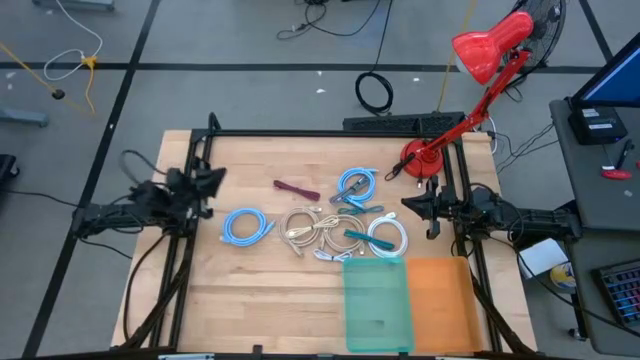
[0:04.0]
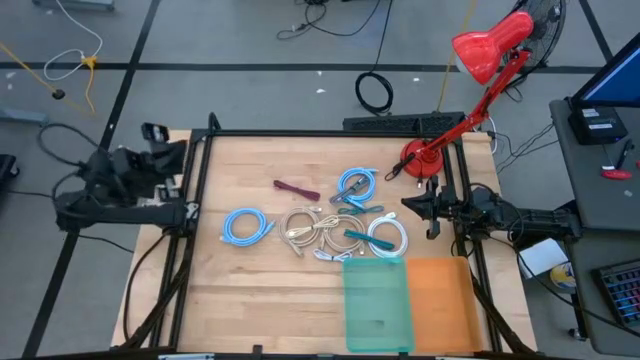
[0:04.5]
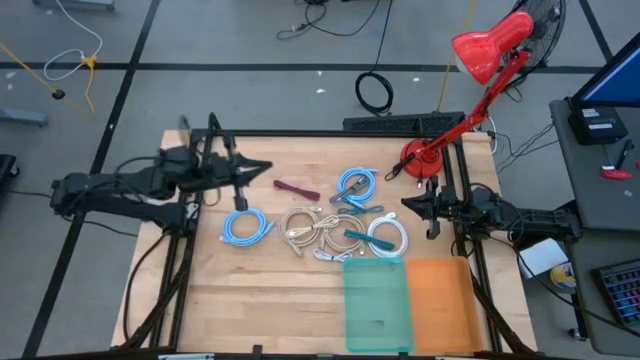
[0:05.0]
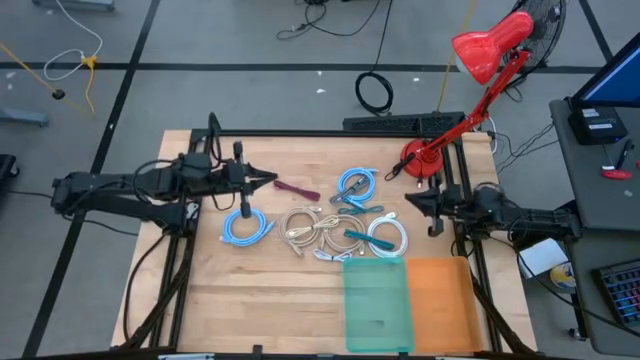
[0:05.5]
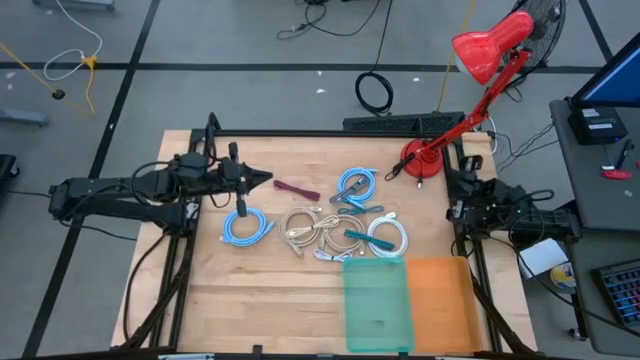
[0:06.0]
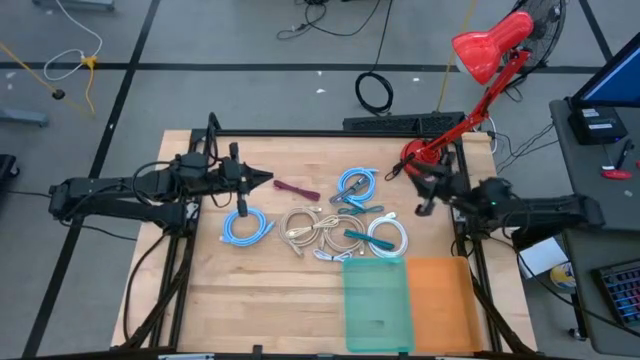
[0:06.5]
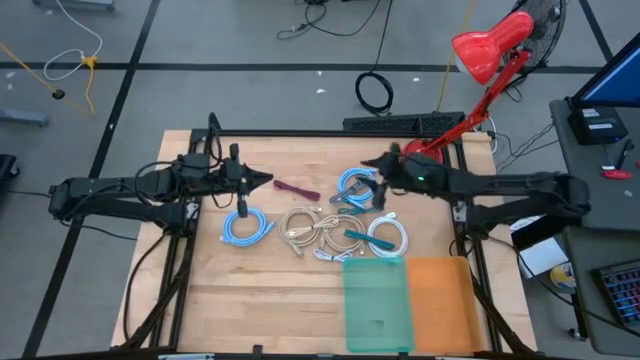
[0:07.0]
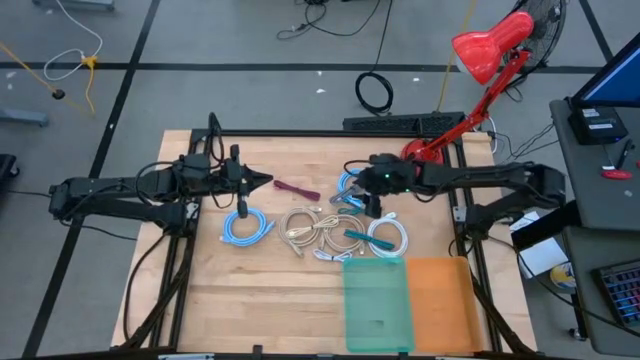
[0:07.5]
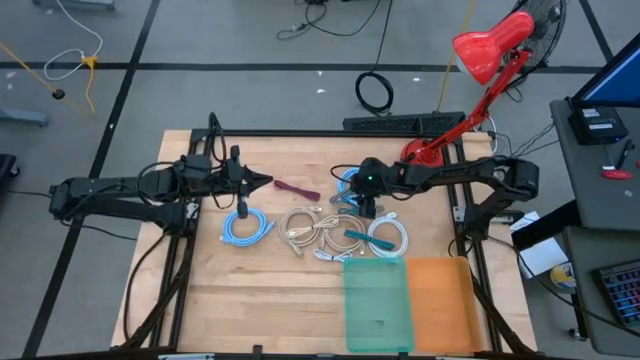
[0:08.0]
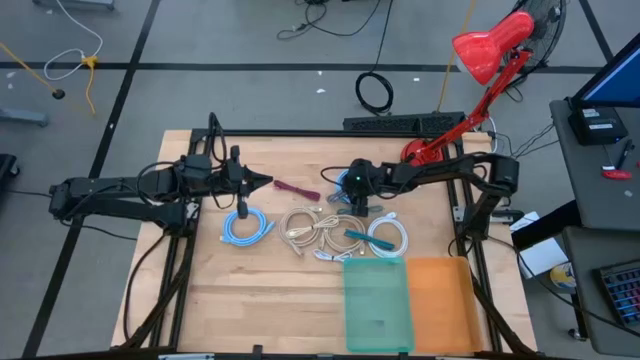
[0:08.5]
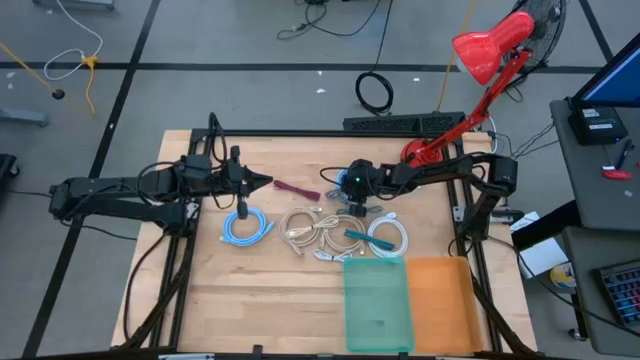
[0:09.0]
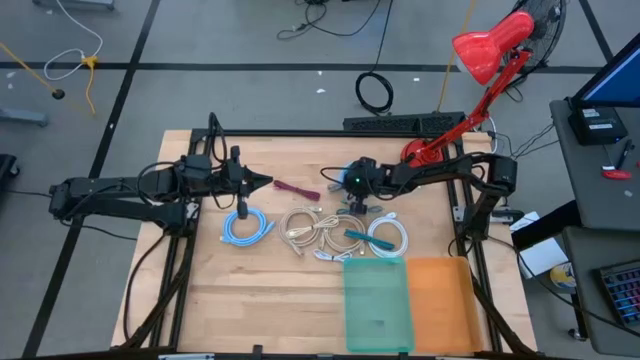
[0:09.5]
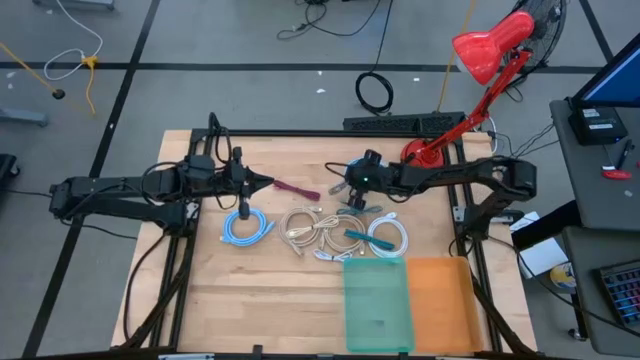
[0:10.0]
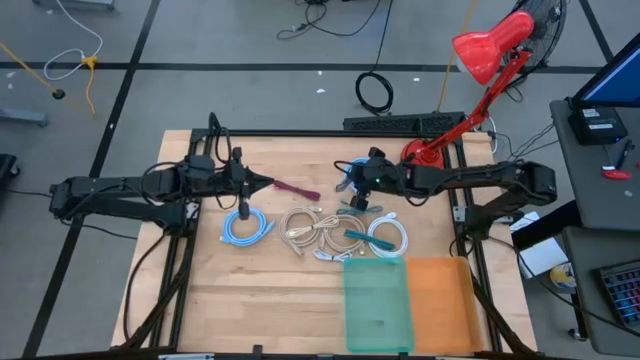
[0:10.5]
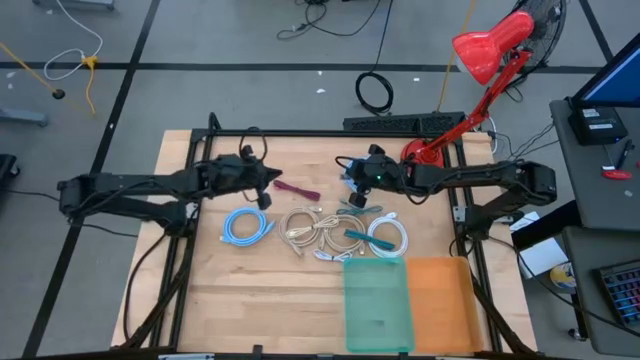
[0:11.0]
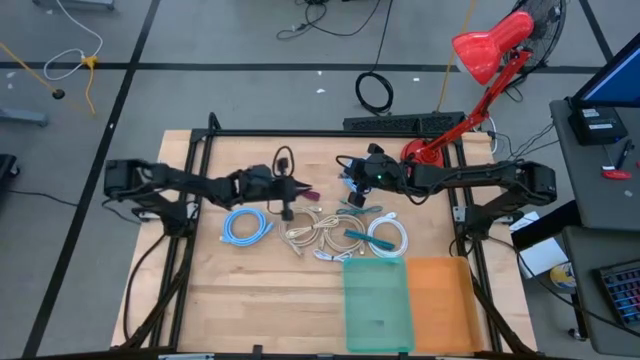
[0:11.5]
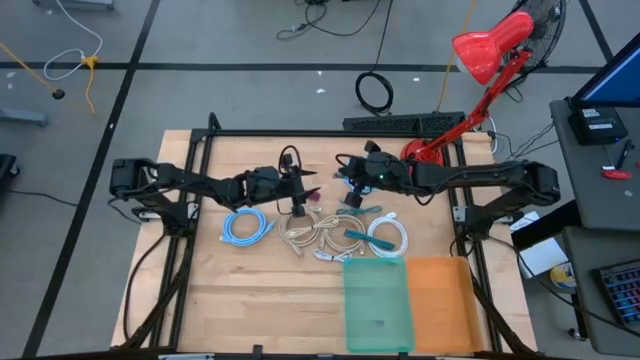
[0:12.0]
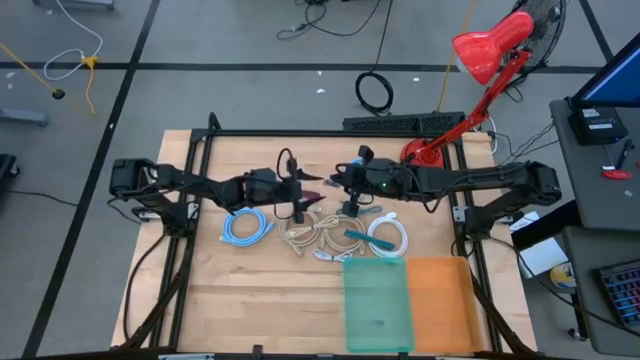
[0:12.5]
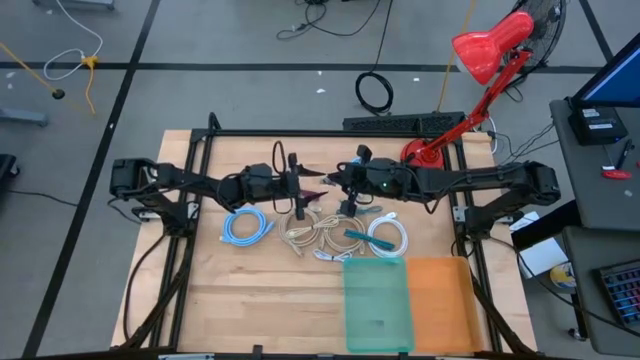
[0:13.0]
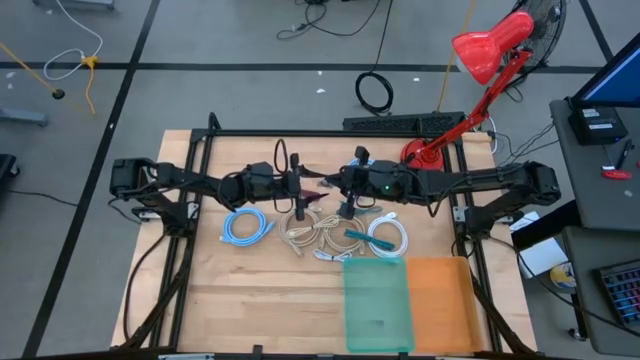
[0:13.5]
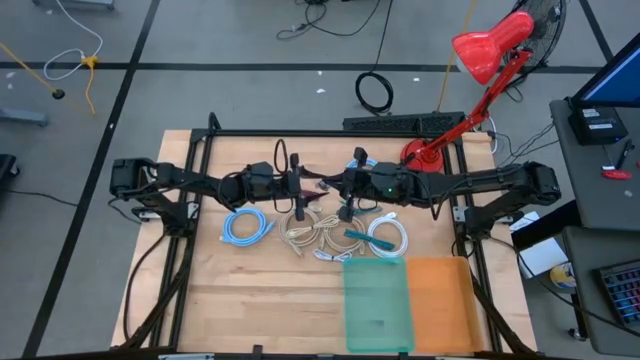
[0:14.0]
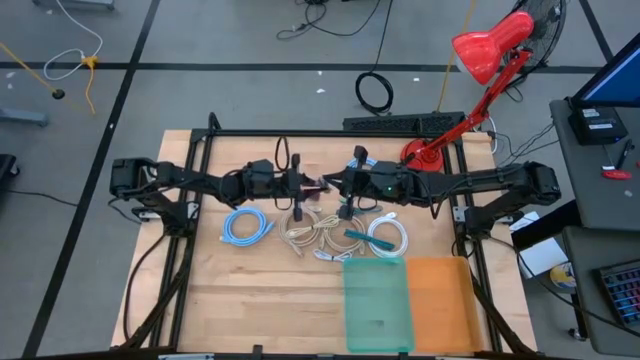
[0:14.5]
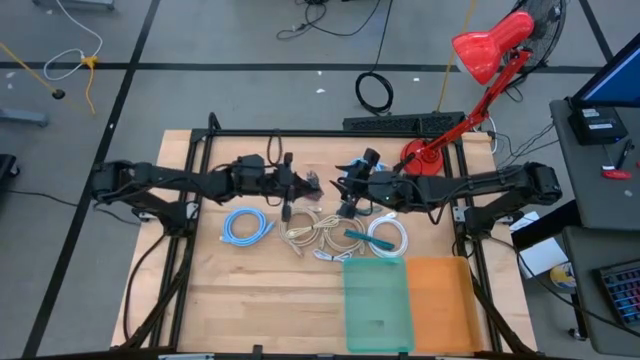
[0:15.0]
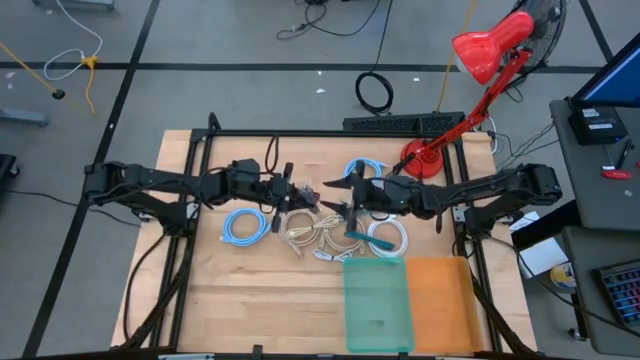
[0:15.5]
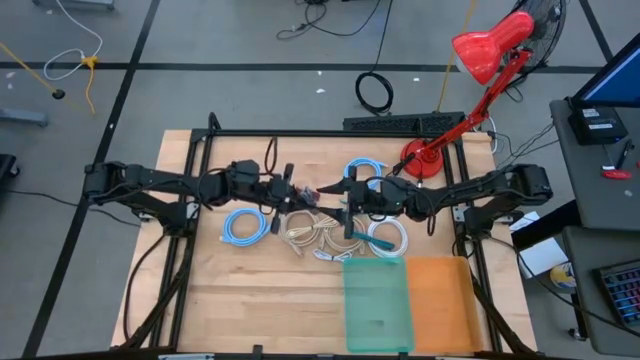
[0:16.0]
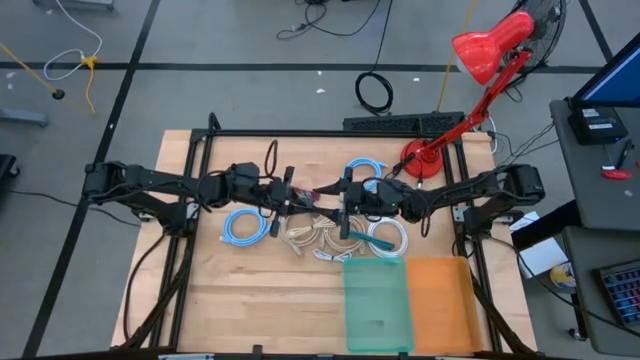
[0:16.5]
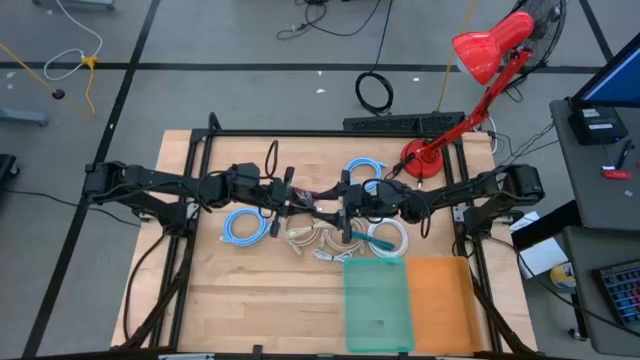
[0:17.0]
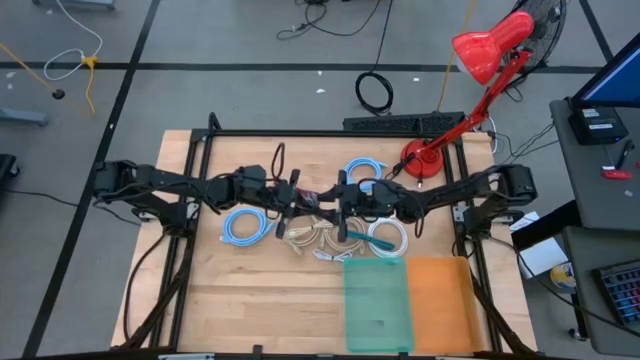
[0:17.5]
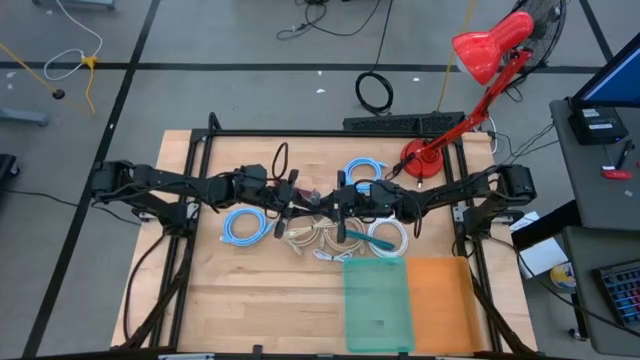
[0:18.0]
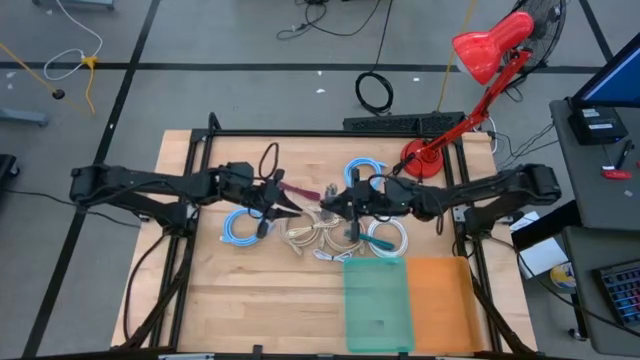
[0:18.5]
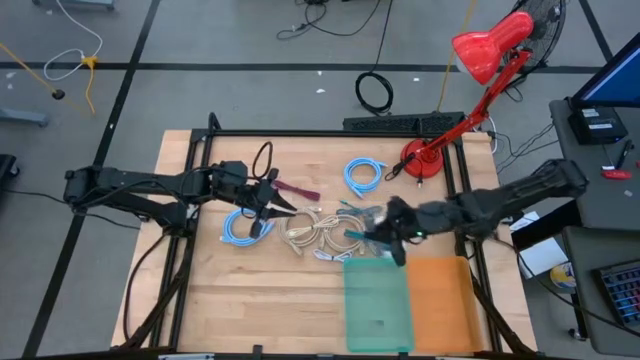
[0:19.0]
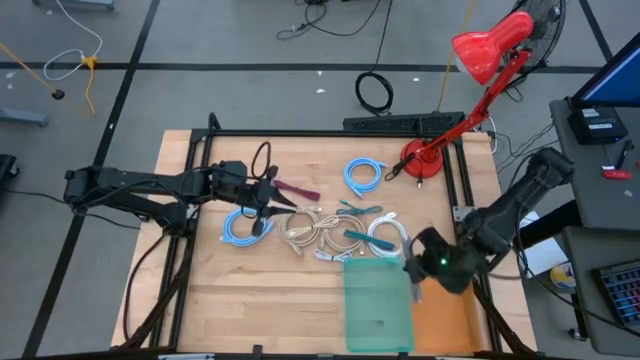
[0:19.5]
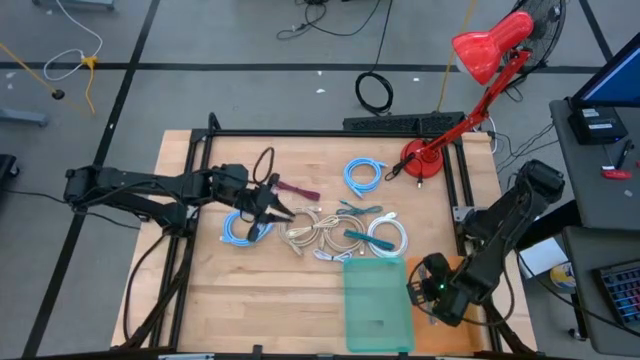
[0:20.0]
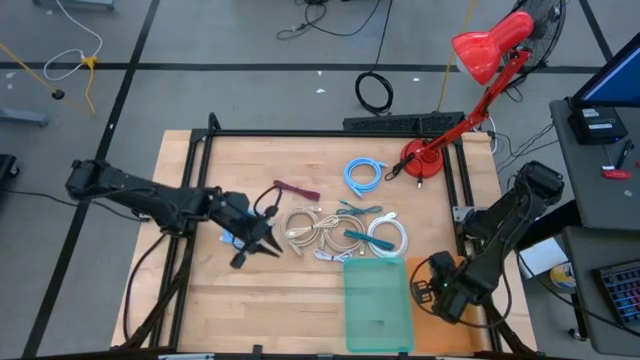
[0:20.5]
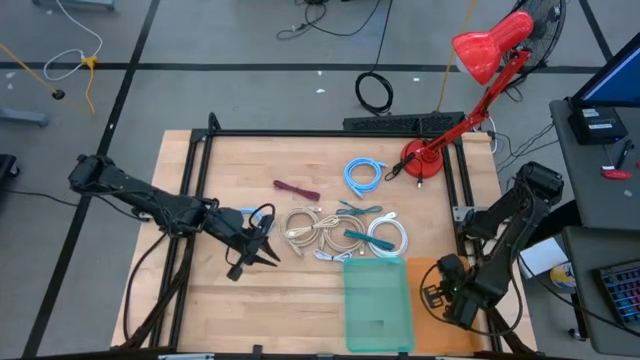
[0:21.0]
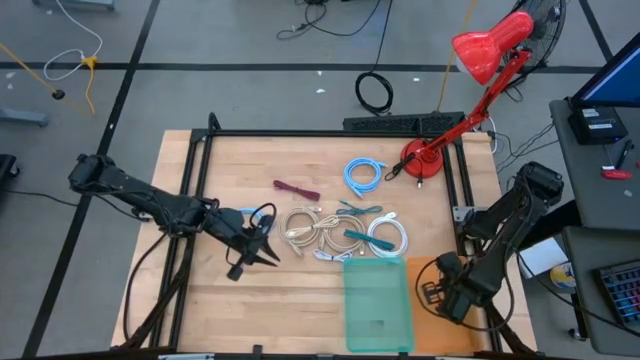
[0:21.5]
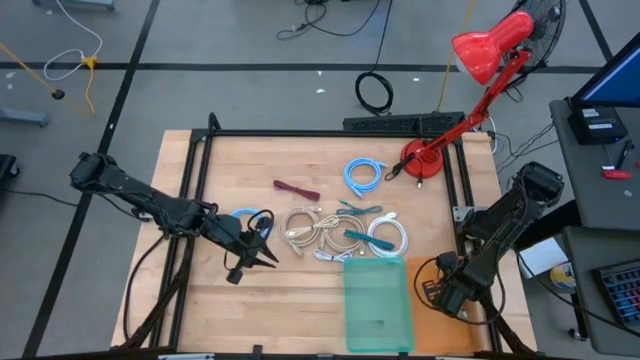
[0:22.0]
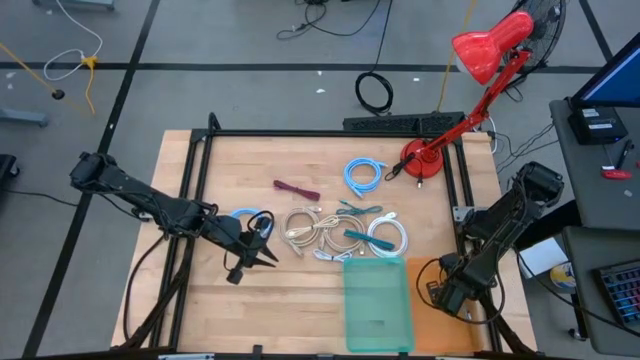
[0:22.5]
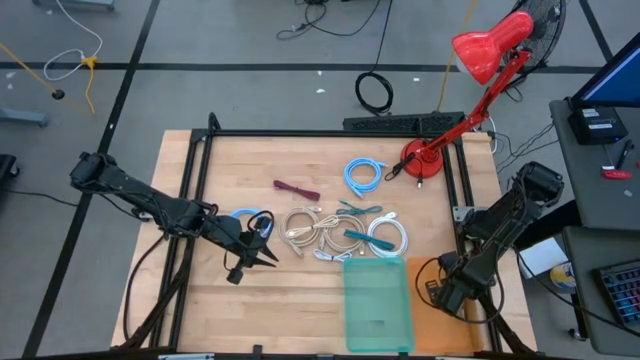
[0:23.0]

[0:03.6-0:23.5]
Task: Pick & Place USB Port
Put the black charger cable into the orange bin

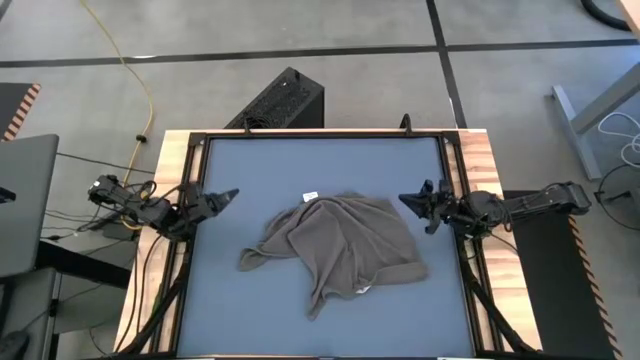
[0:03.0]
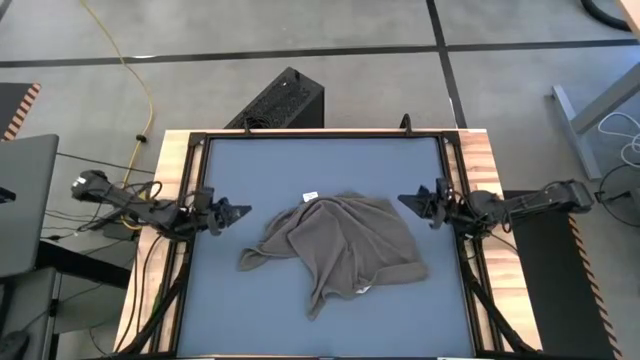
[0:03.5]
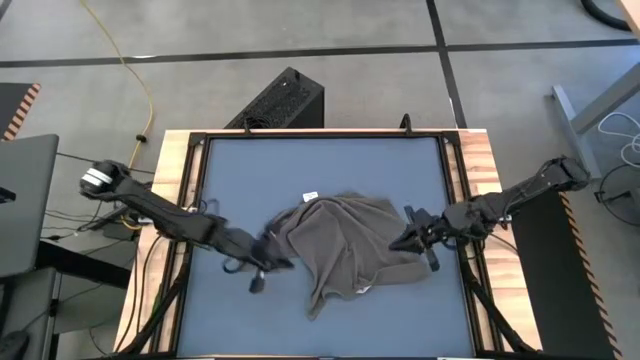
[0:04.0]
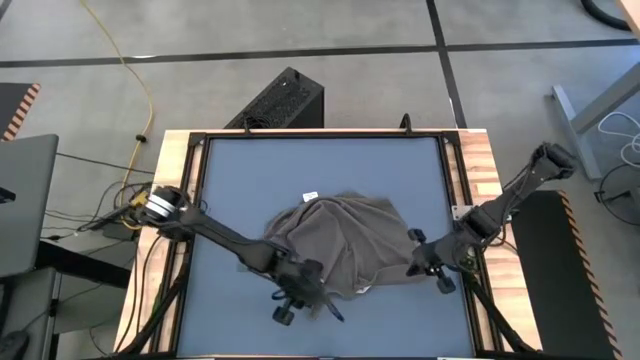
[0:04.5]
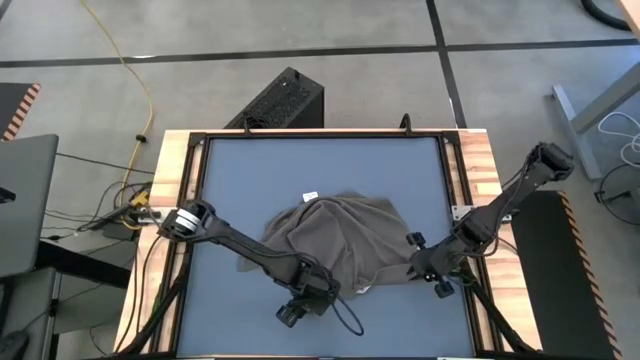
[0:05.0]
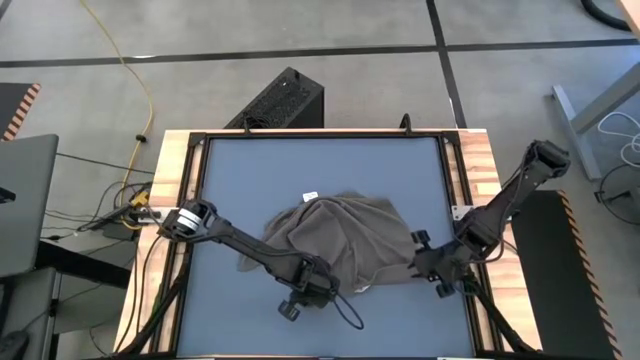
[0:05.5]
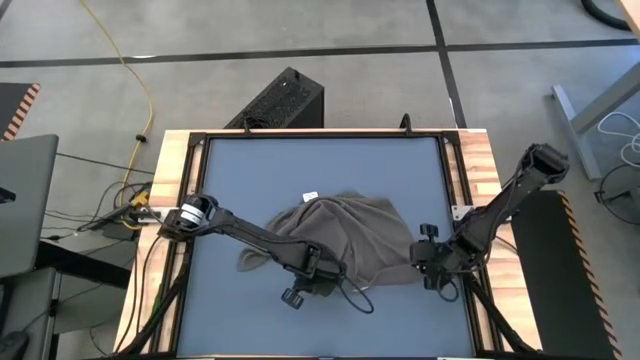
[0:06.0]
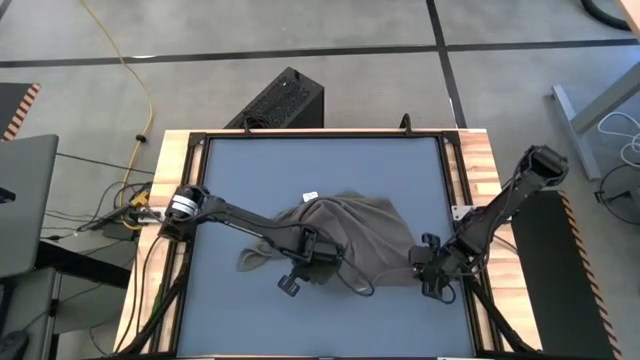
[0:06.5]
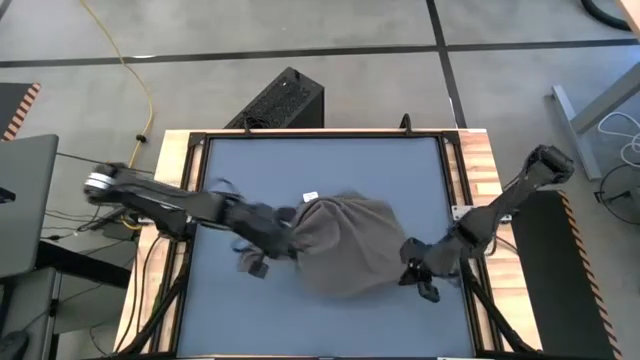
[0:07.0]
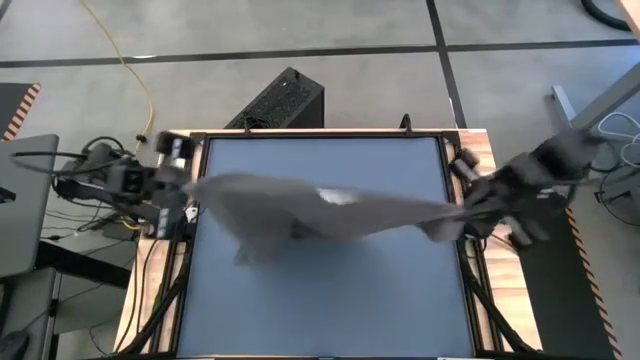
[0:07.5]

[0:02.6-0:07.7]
Task: Roll towel
Roll the grey towel
